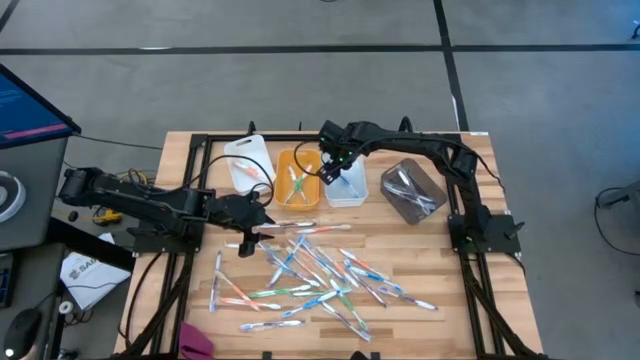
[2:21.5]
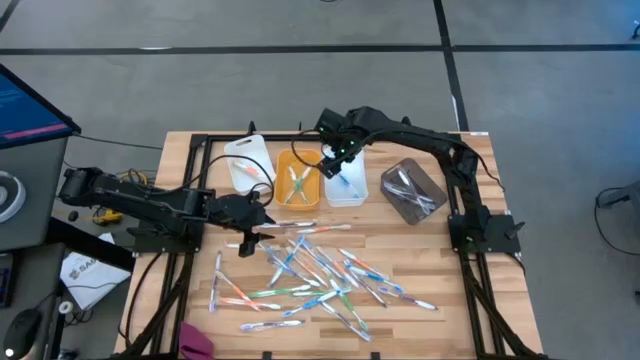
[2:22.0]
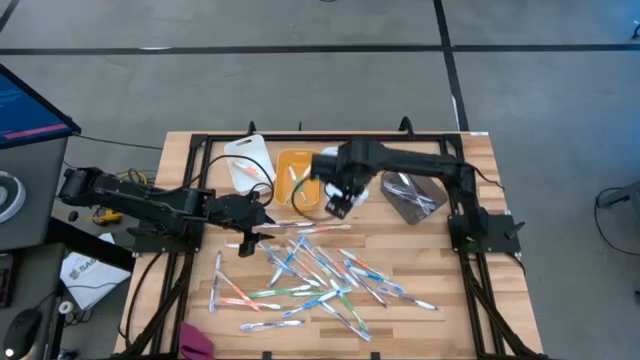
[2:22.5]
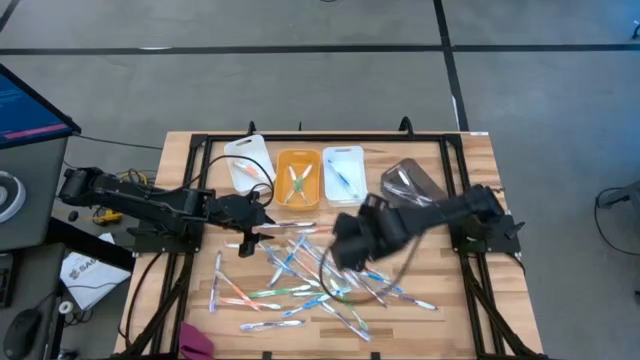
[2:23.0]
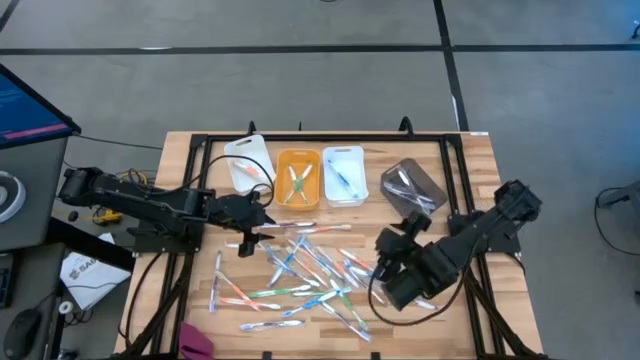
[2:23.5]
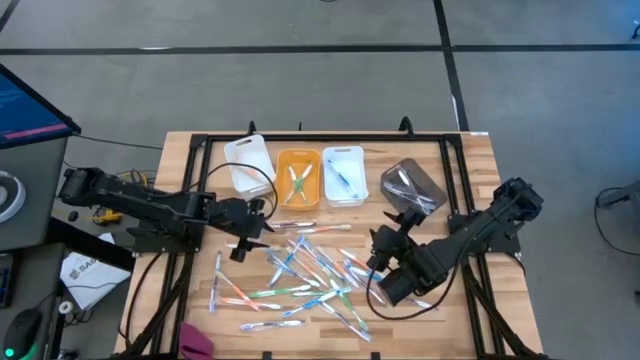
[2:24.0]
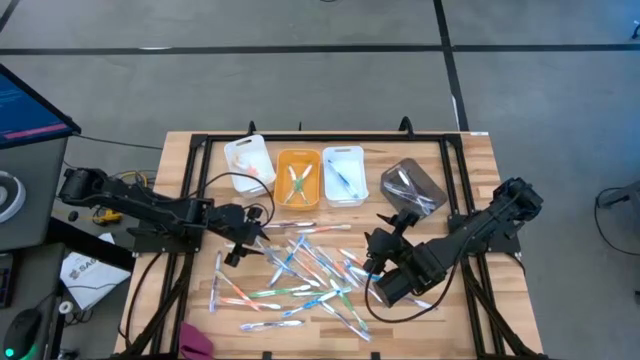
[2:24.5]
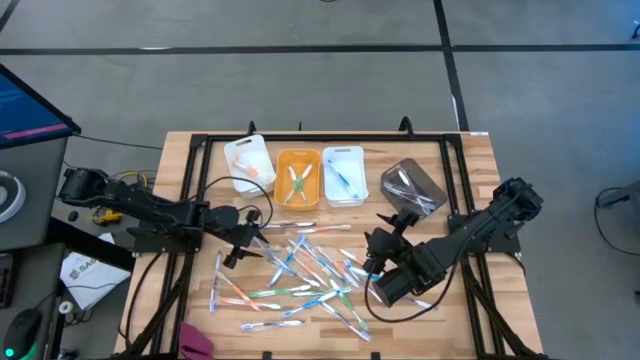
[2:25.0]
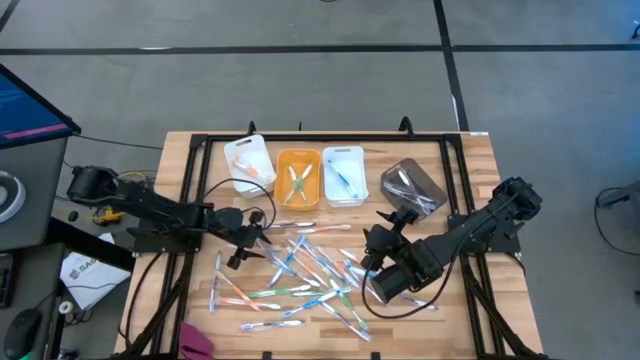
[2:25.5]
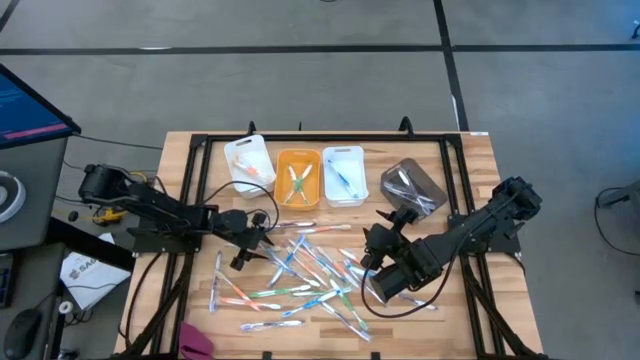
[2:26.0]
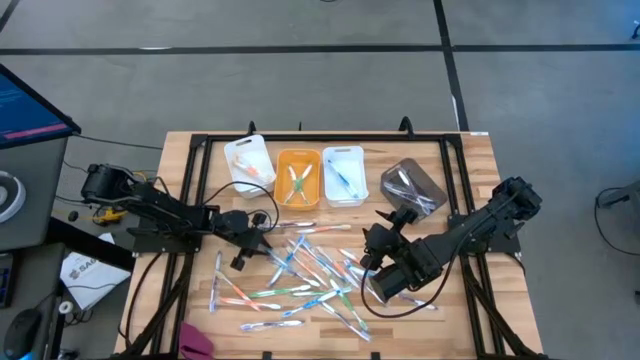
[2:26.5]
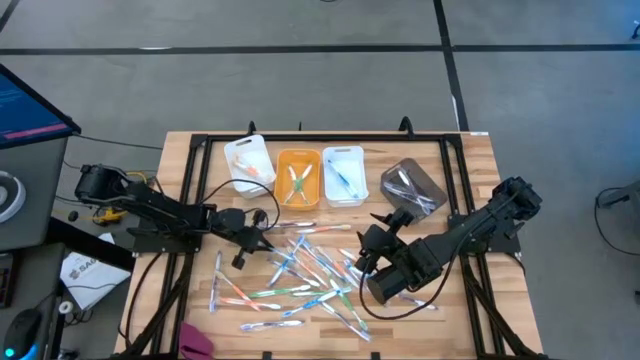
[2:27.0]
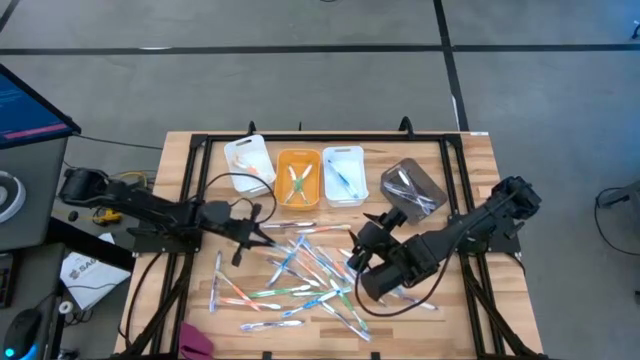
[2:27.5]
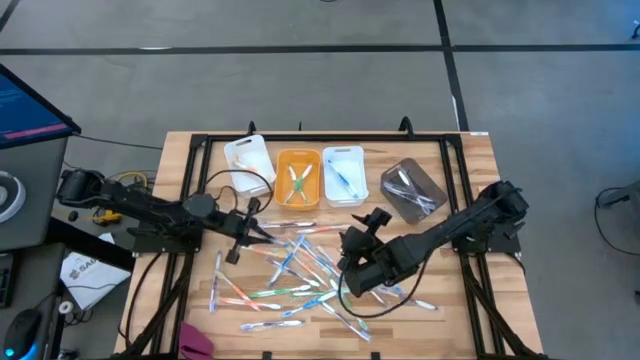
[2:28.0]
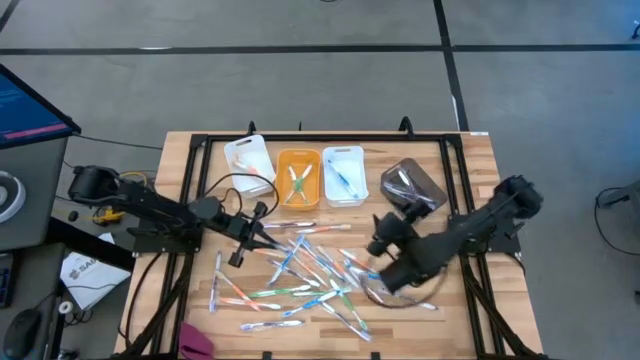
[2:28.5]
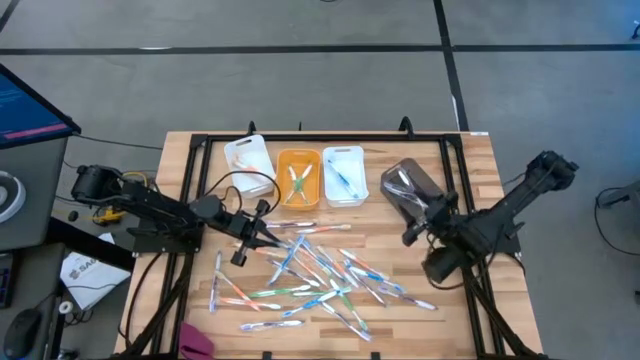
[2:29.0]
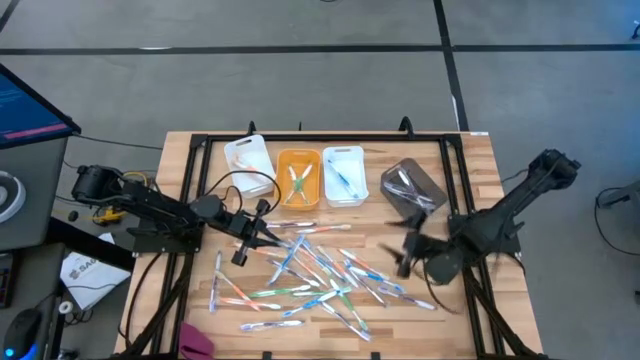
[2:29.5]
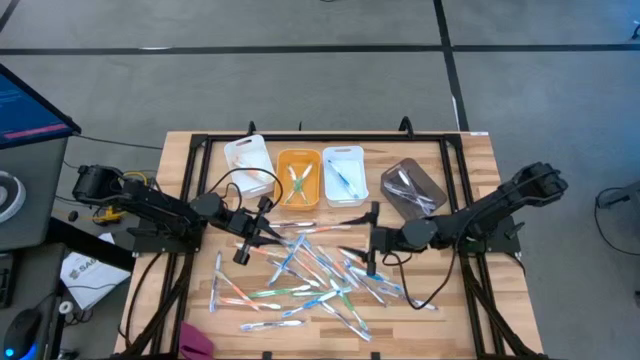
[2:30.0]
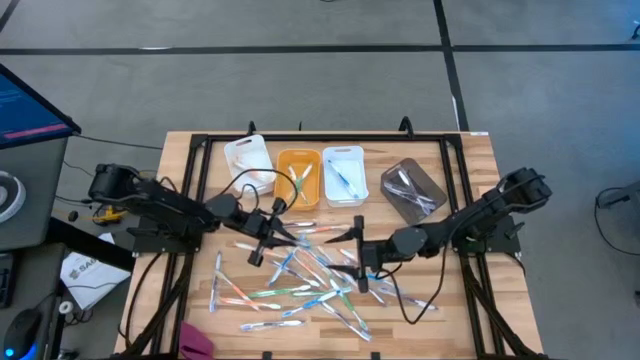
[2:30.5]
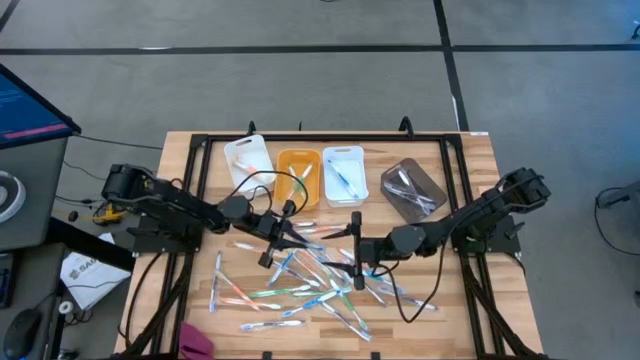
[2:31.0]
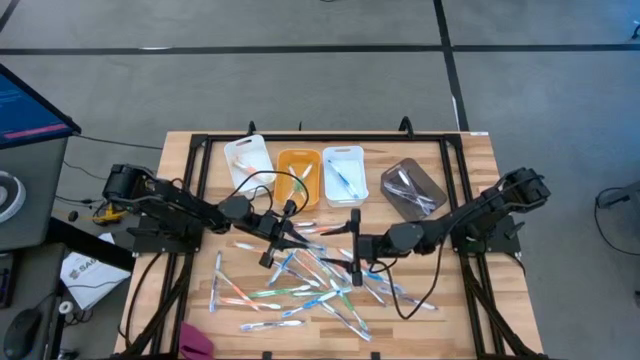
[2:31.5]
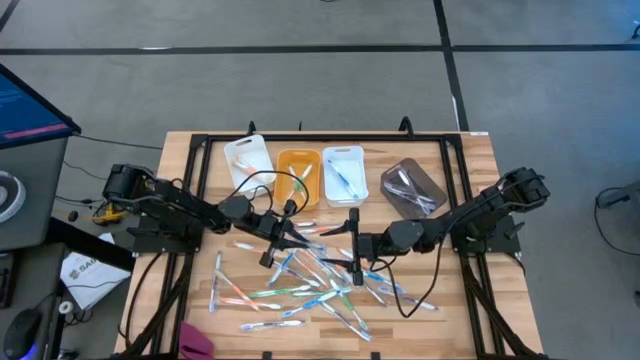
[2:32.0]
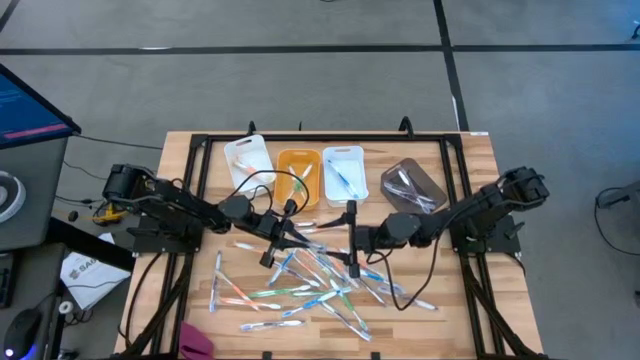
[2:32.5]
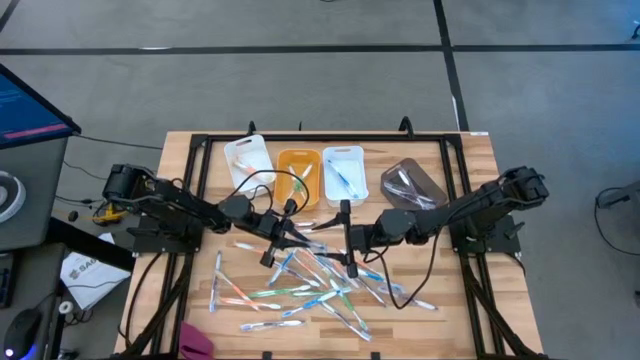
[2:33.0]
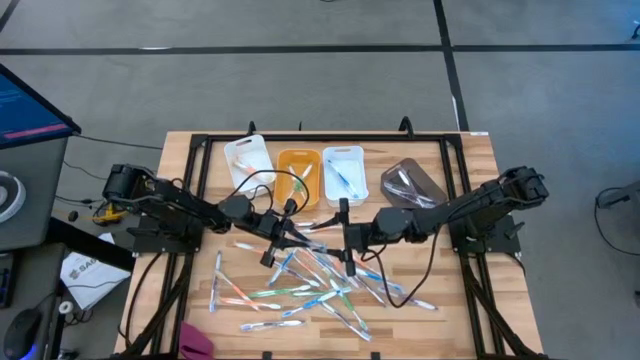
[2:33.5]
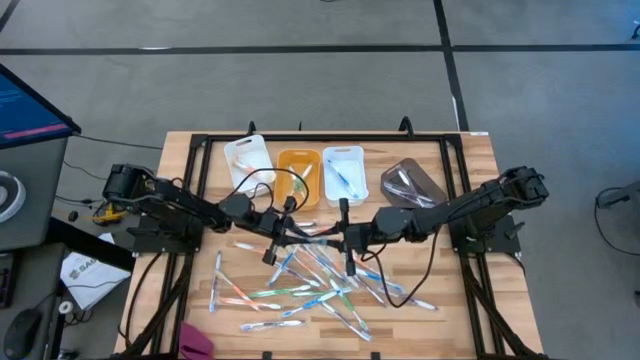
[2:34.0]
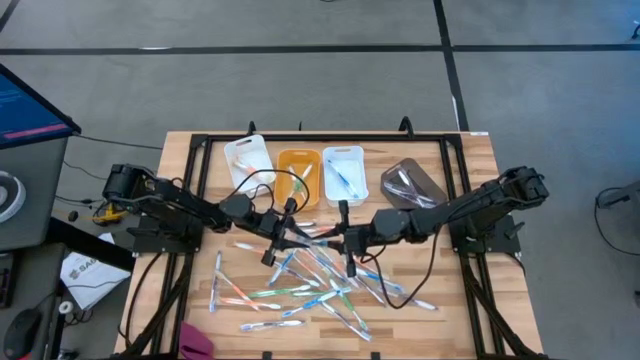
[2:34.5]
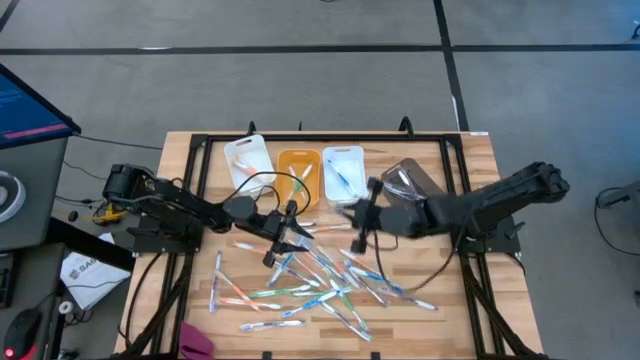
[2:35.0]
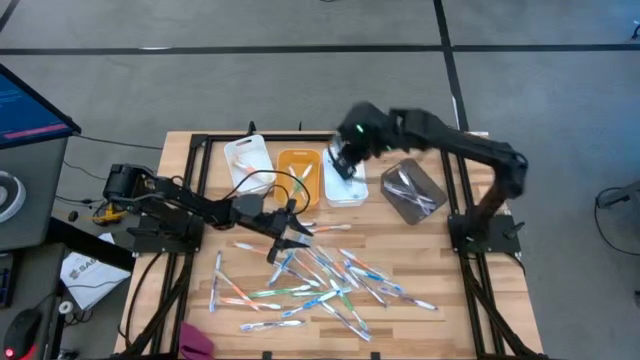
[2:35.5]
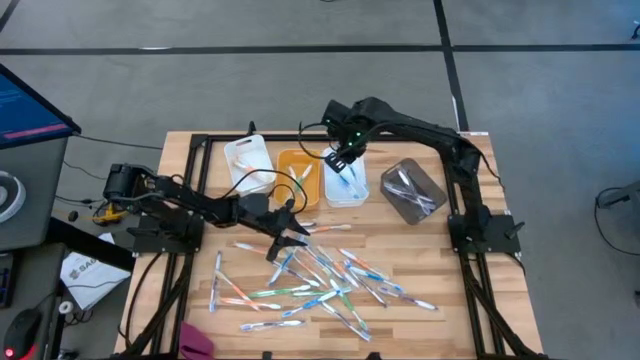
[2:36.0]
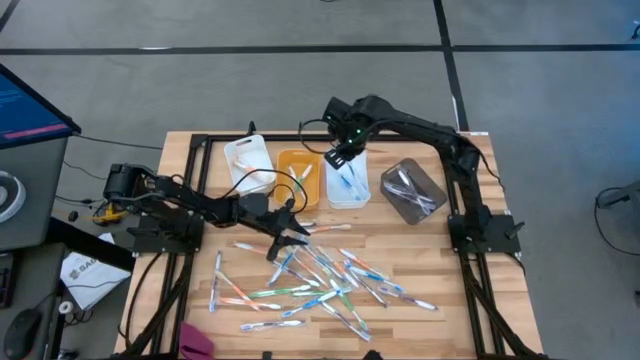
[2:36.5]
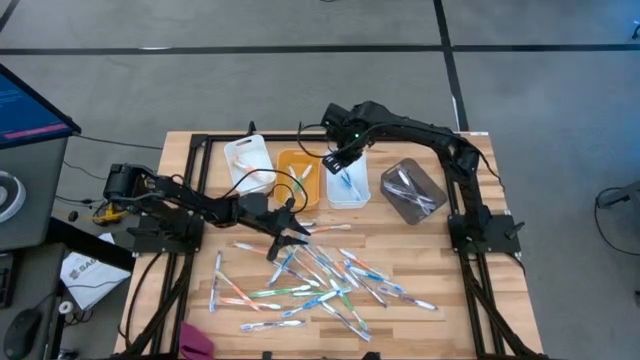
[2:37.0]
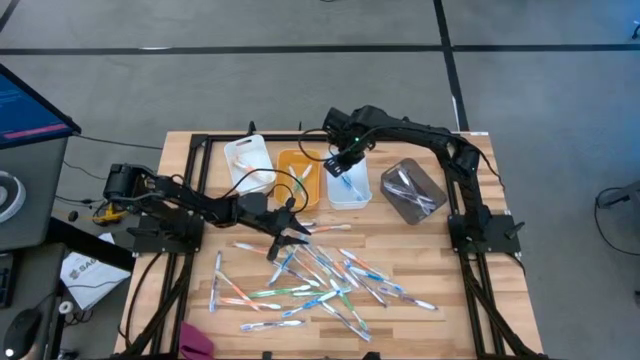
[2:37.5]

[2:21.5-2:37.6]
Task: Pick & Place Toothbrushes
Put the white blue toothbrush into the right white bin

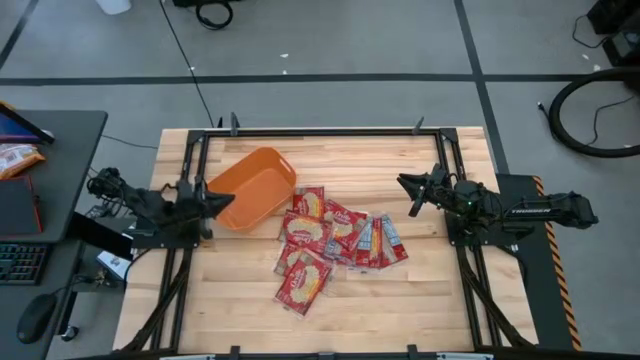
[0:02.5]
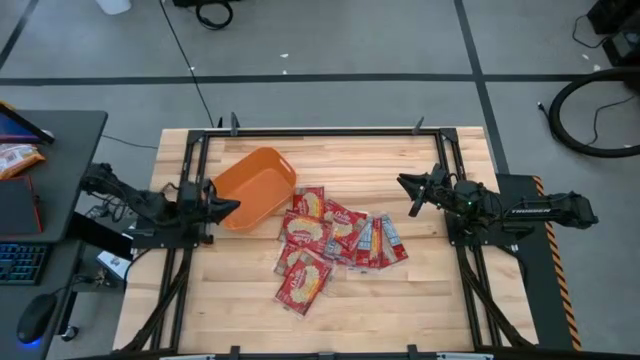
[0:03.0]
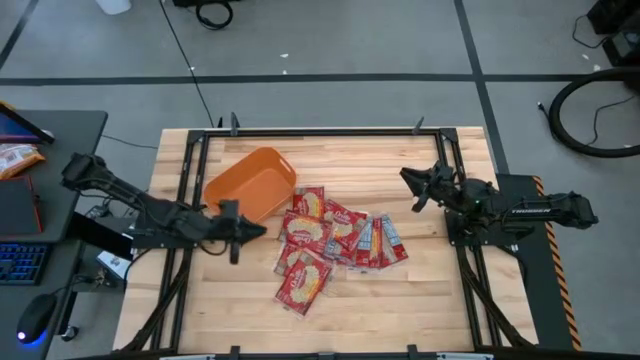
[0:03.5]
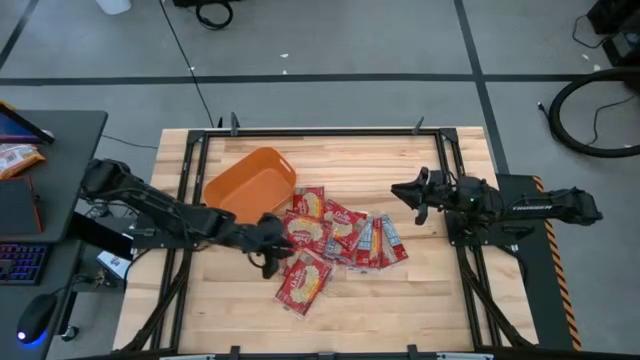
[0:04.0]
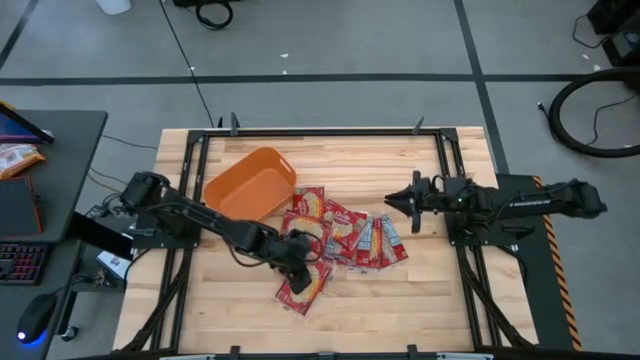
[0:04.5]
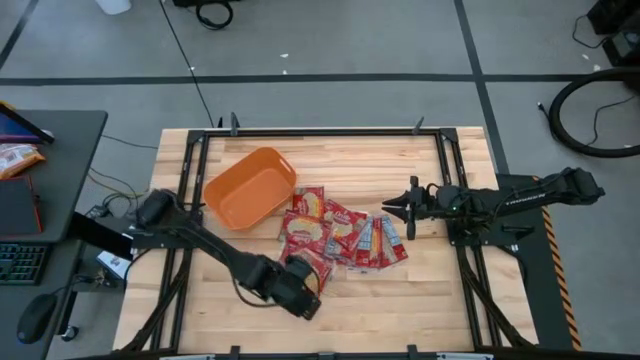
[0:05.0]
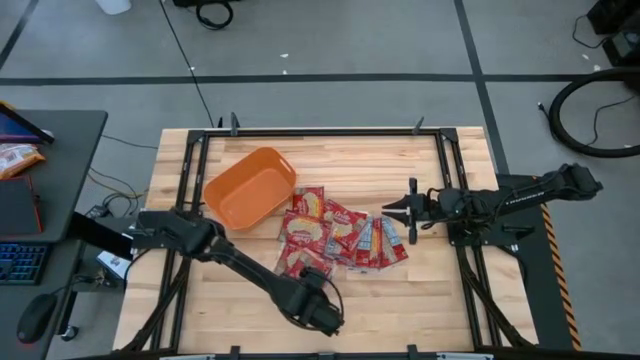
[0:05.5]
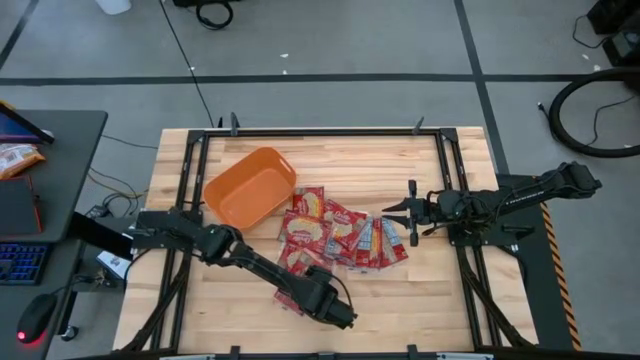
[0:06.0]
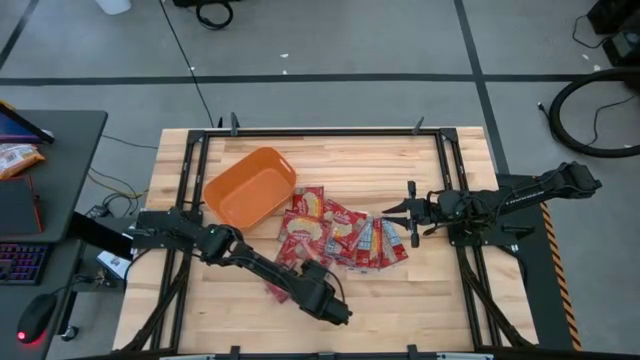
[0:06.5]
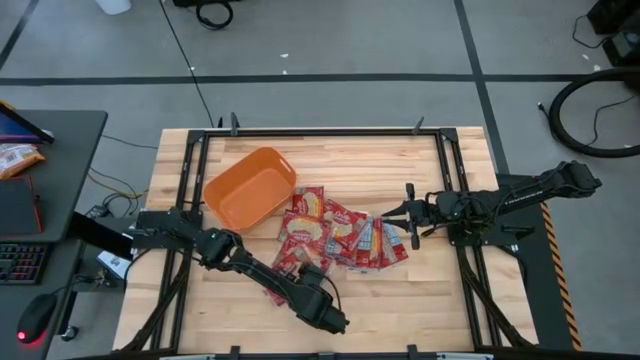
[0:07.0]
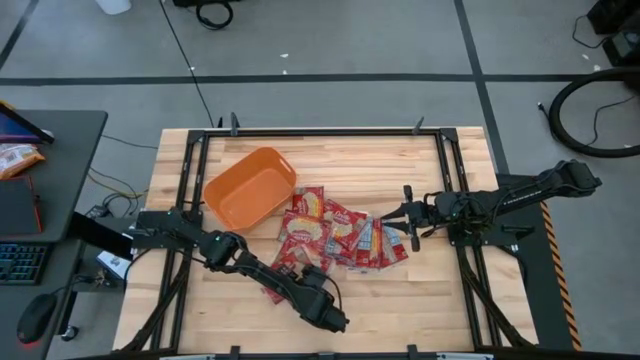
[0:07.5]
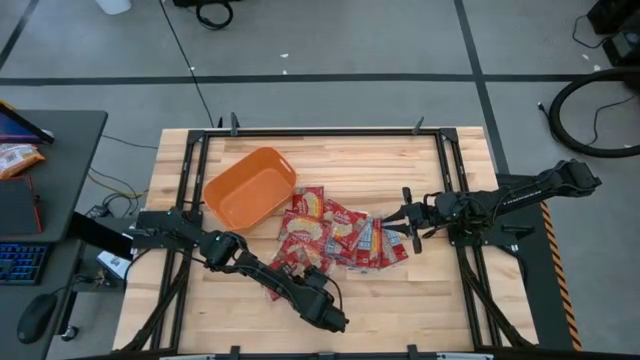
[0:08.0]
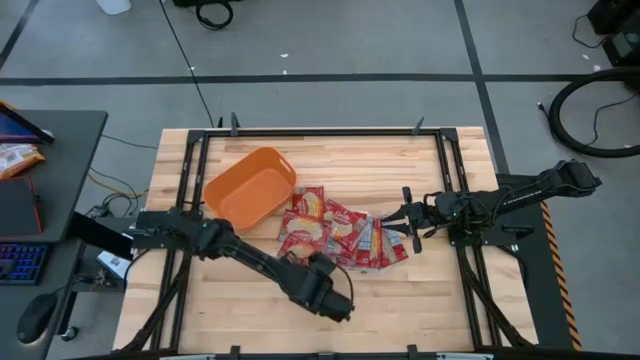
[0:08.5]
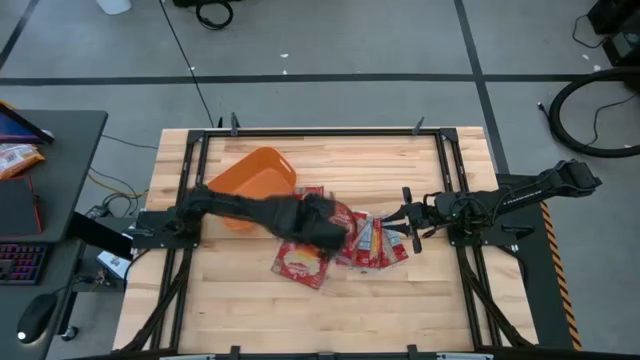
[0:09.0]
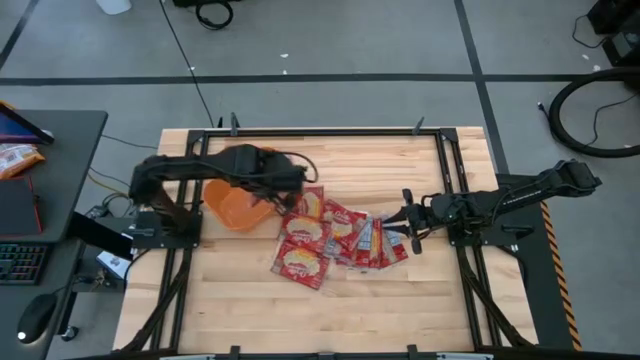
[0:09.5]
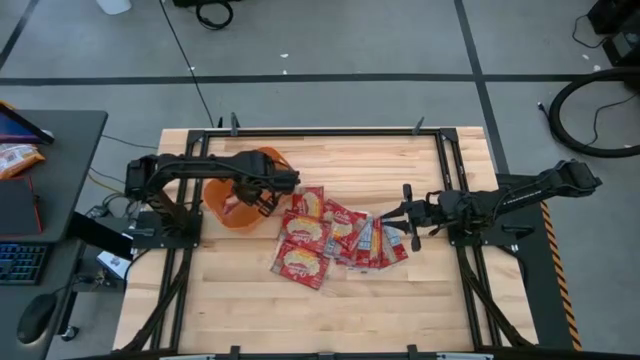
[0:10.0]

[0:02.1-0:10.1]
Task: Sort popcorn bags into baskets
Put the red popcorn bag into the orange bin
